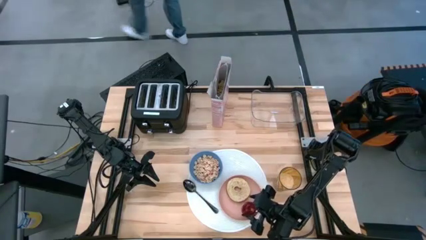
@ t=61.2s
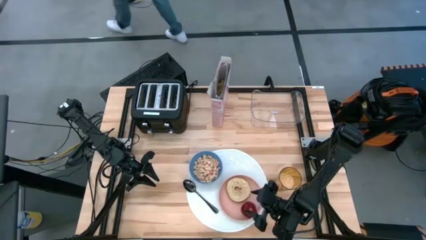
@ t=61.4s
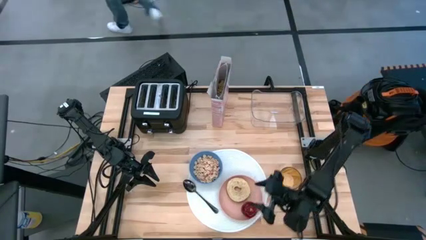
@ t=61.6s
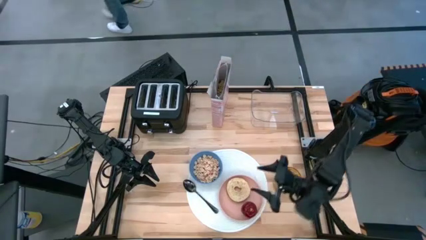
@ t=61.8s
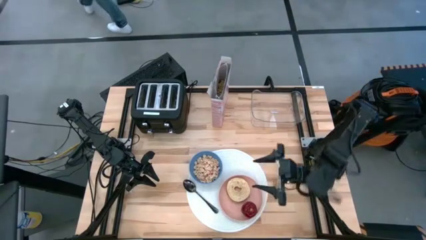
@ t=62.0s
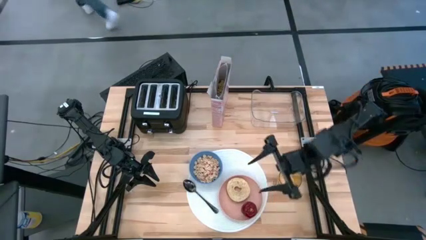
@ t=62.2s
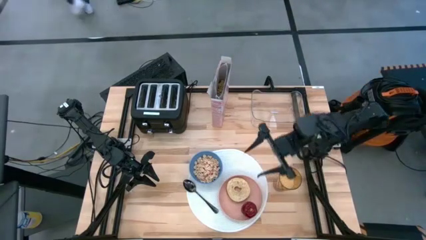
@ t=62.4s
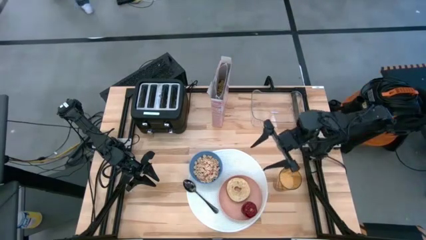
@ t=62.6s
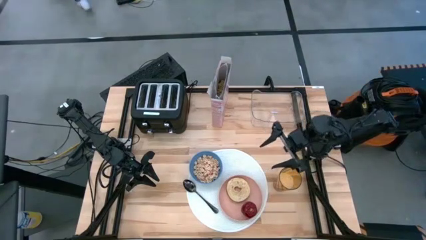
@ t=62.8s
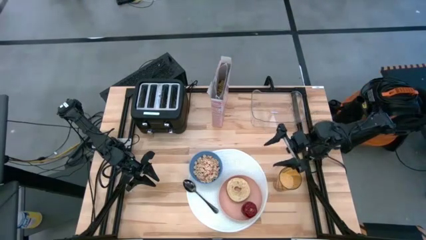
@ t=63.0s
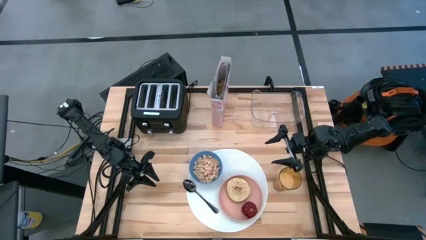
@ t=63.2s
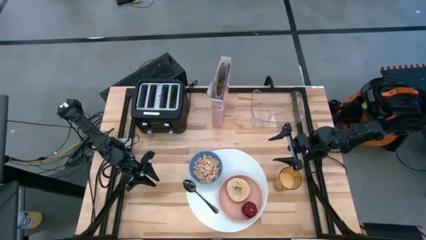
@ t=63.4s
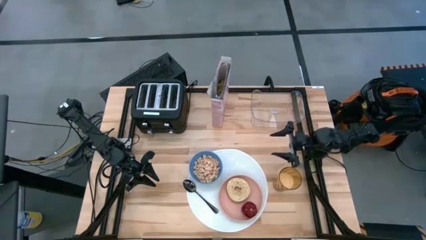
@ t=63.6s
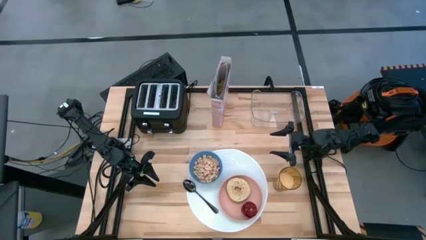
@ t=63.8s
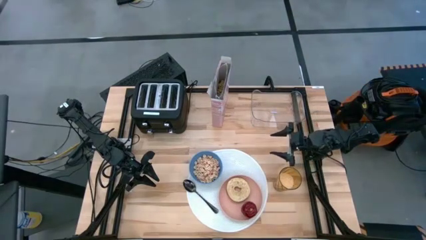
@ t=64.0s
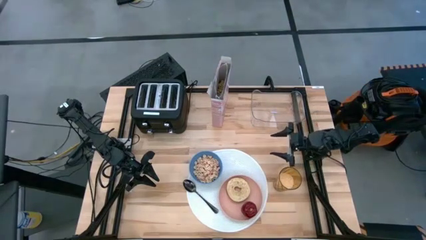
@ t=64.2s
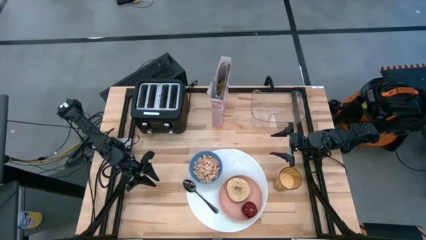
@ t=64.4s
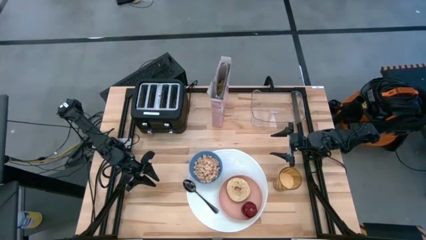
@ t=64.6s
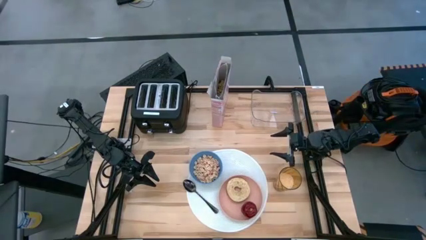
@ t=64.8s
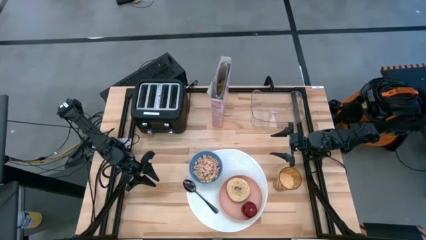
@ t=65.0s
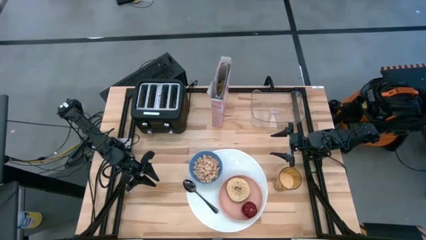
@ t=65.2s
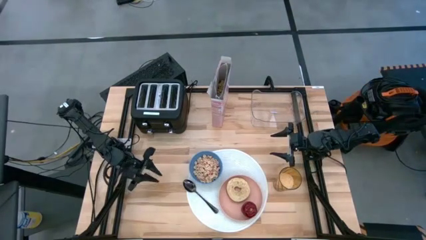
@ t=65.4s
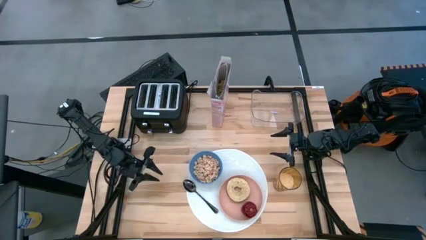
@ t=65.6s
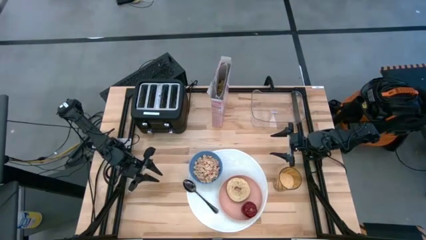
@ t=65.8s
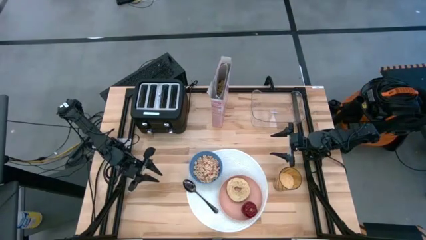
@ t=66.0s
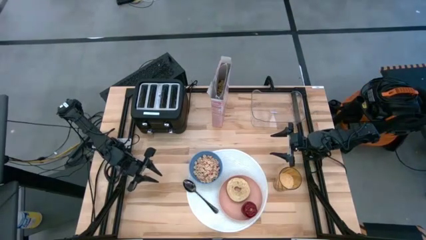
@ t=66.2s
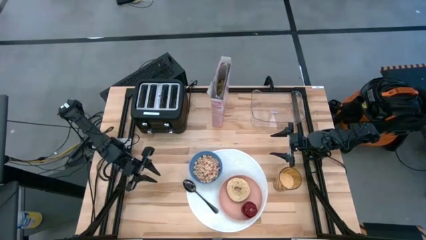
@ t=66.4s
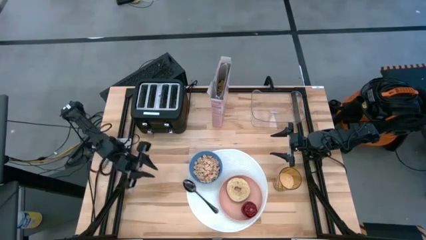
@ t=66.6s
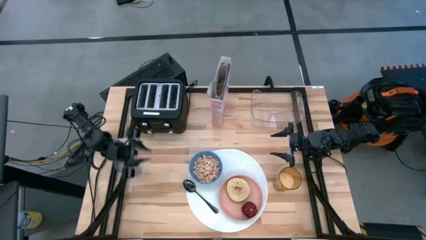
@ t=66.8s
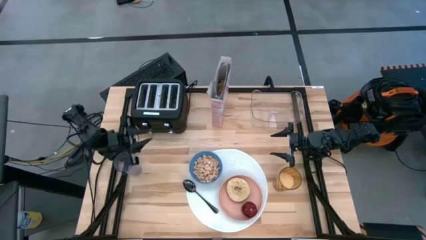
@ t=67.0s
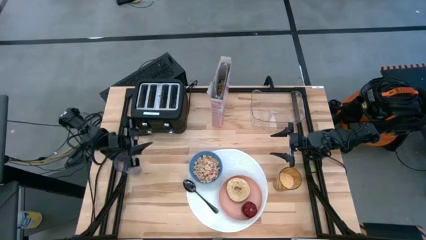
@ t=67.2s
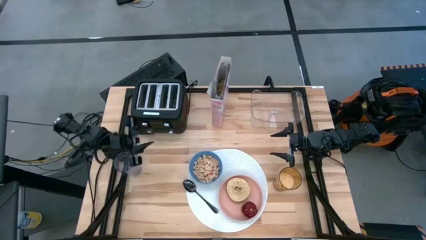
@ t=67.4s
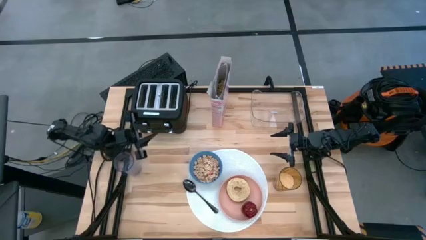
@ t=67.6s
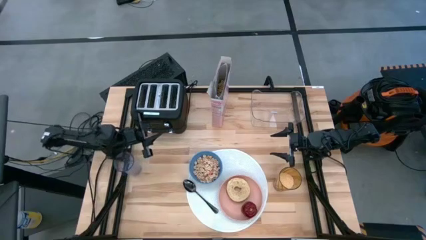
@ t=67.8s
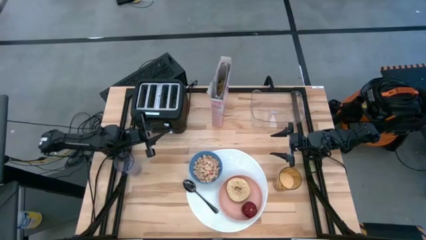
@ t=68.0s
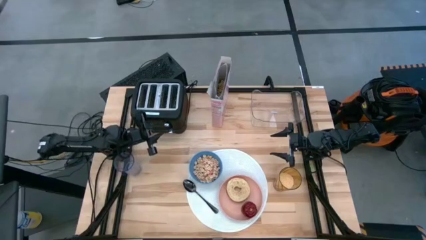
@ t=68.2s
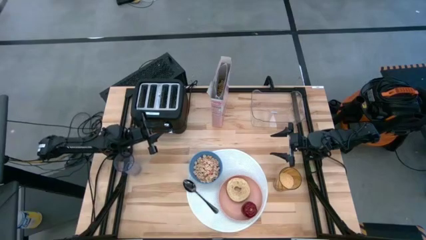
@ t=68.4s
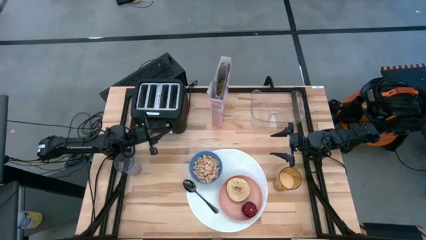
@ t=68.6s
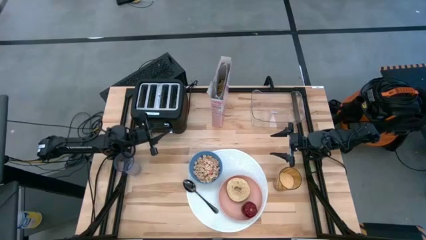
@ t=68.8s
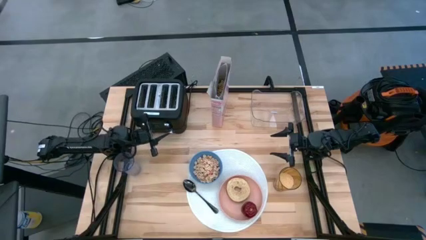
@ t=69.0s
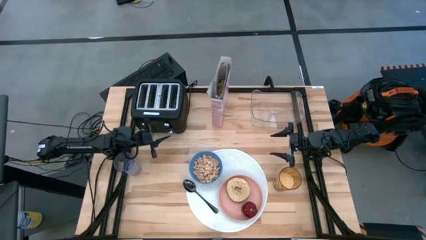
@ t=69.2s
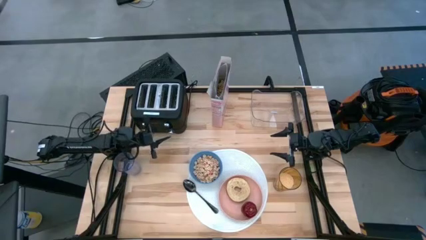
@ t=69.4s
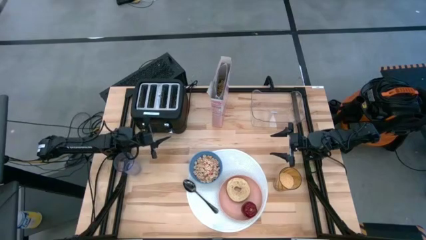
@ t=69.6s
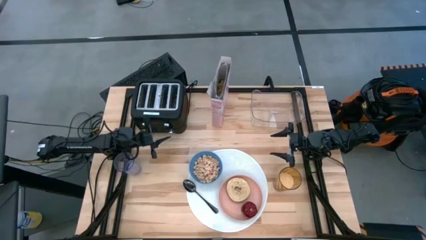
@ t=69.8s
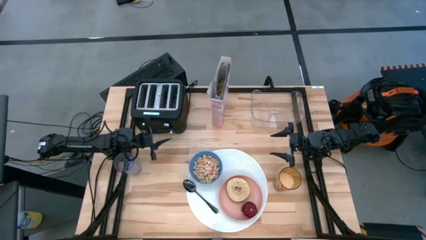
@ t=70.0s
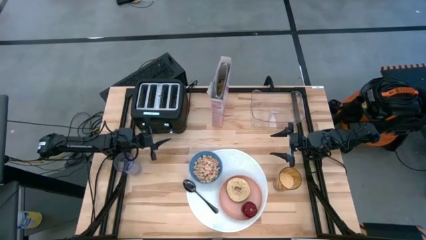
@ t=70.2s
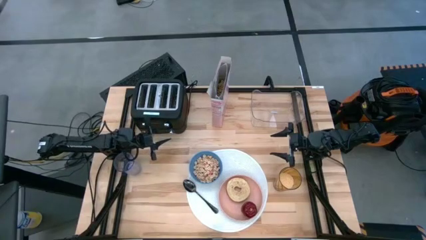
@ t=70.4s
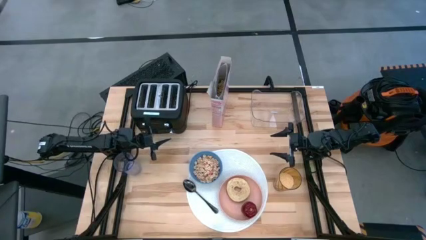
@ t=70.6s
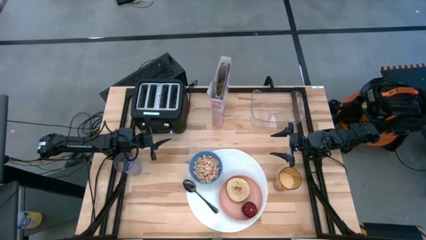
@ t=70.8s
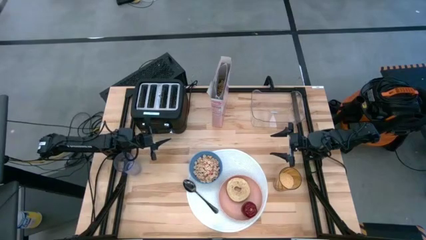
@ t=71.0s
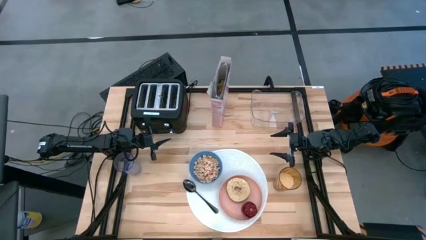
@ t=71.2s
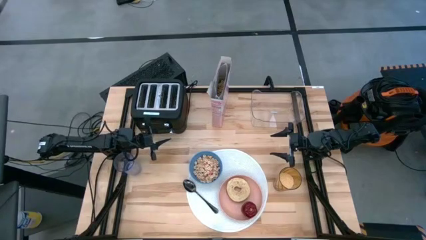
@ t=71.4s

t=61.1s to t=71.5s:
Task: Arrange a breakfast setting
Return to Home Position
